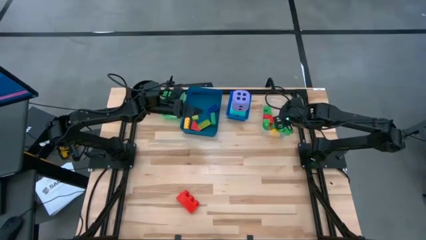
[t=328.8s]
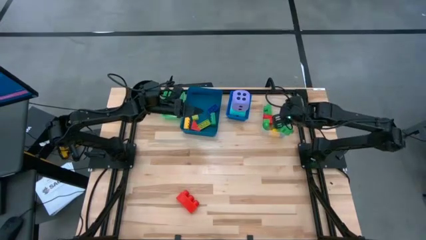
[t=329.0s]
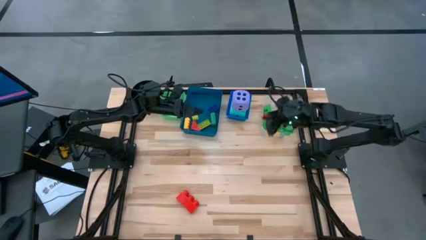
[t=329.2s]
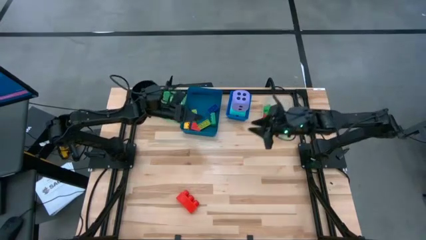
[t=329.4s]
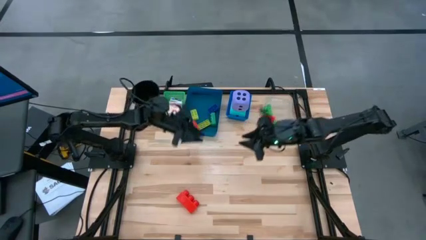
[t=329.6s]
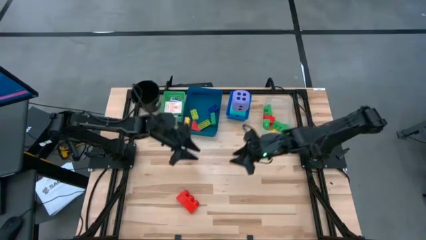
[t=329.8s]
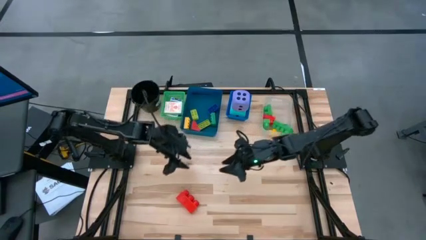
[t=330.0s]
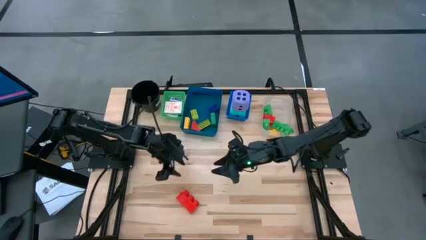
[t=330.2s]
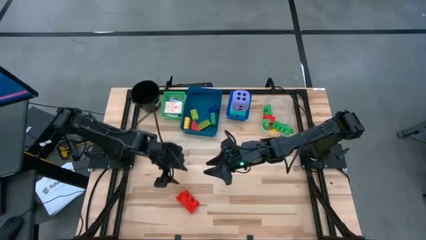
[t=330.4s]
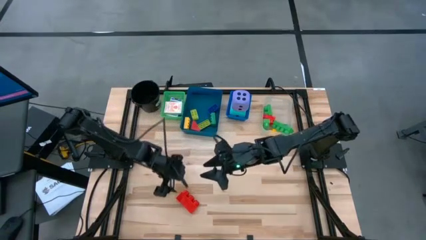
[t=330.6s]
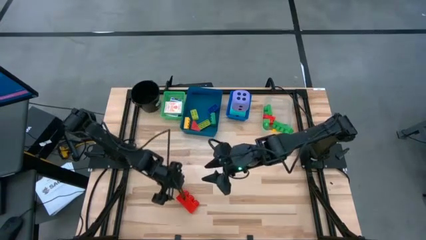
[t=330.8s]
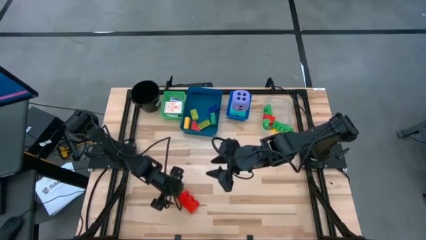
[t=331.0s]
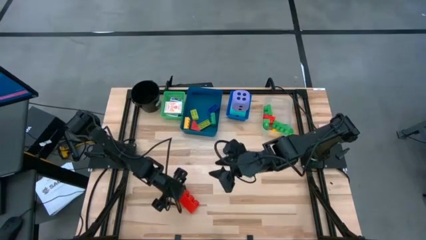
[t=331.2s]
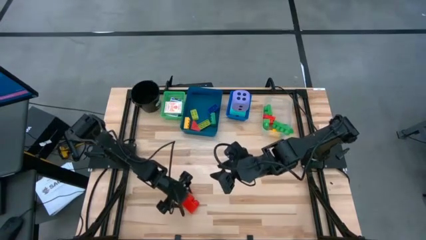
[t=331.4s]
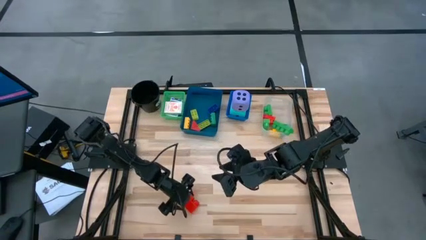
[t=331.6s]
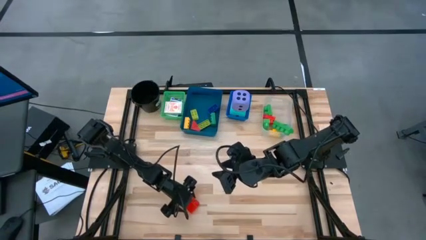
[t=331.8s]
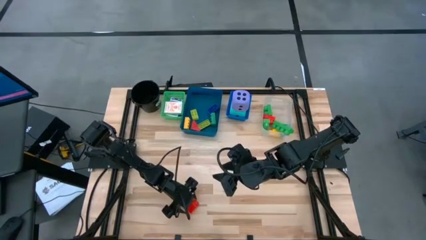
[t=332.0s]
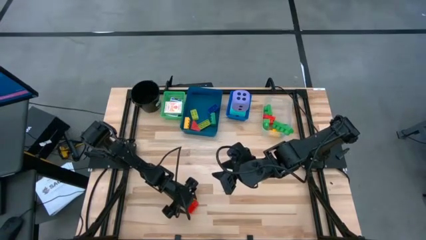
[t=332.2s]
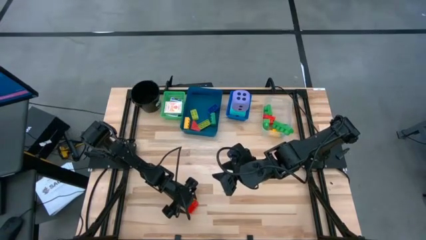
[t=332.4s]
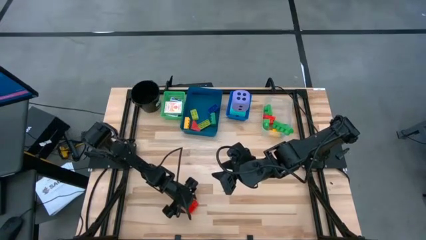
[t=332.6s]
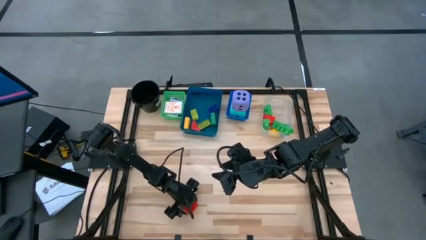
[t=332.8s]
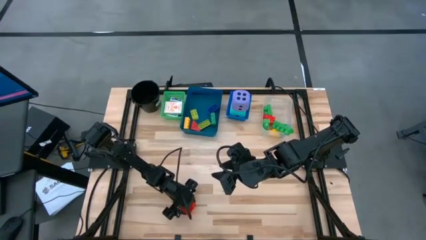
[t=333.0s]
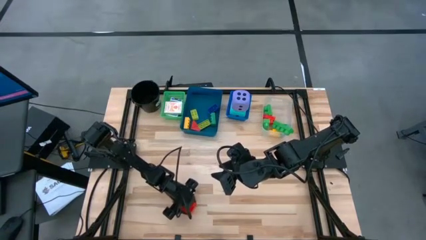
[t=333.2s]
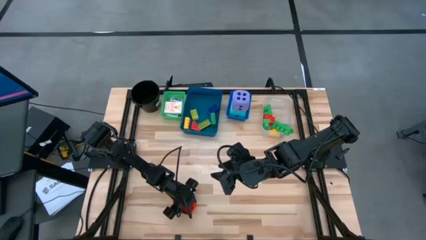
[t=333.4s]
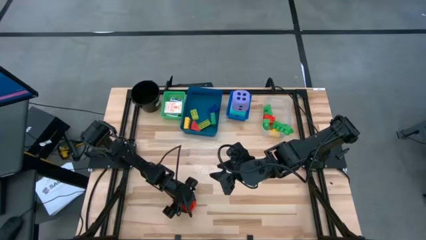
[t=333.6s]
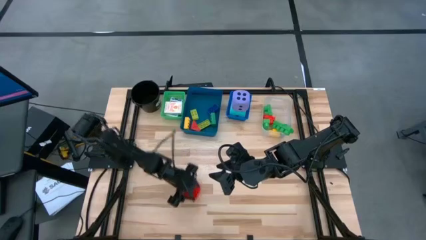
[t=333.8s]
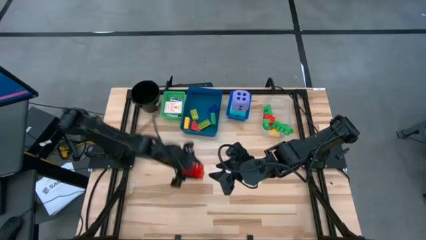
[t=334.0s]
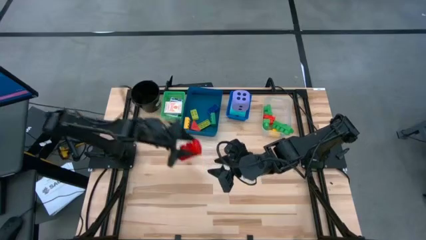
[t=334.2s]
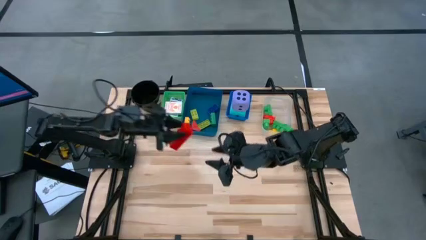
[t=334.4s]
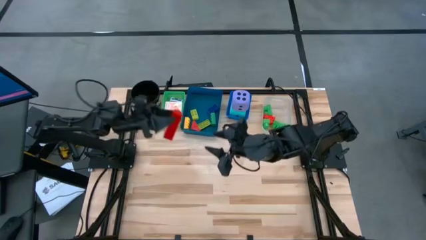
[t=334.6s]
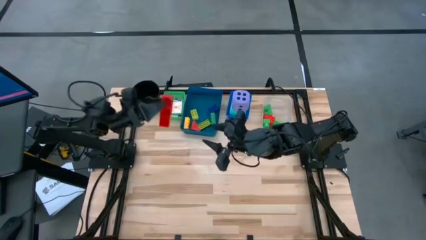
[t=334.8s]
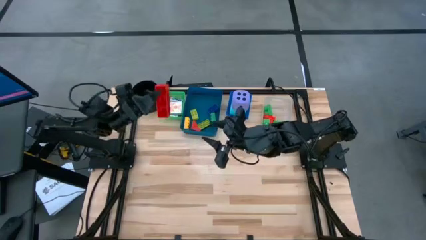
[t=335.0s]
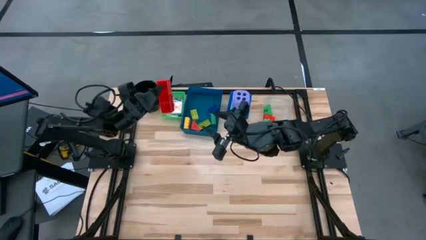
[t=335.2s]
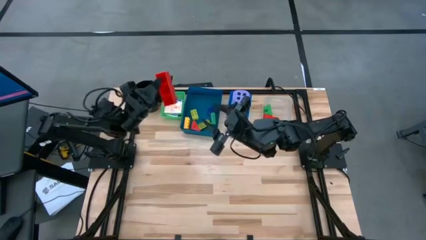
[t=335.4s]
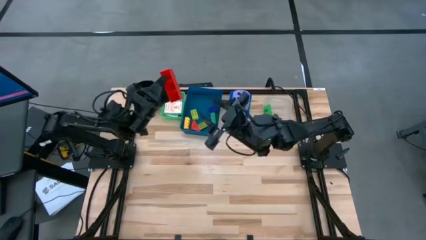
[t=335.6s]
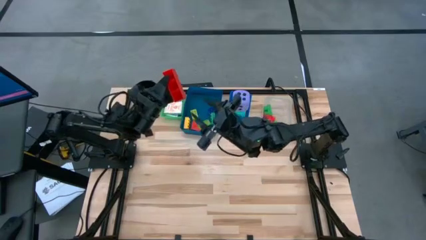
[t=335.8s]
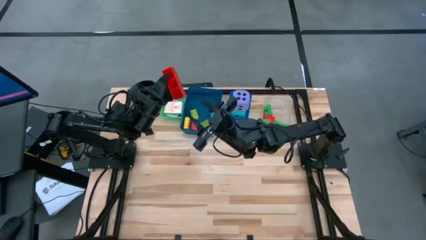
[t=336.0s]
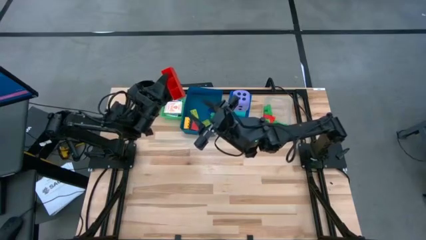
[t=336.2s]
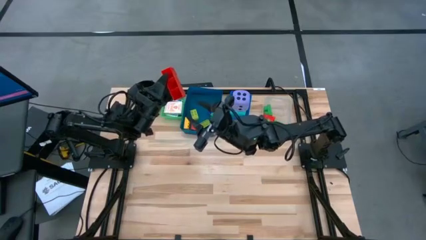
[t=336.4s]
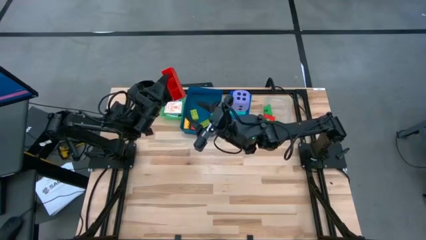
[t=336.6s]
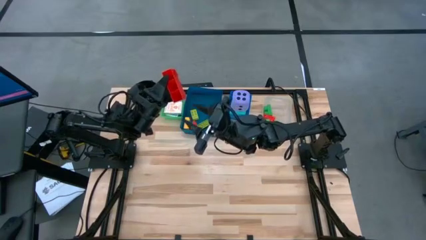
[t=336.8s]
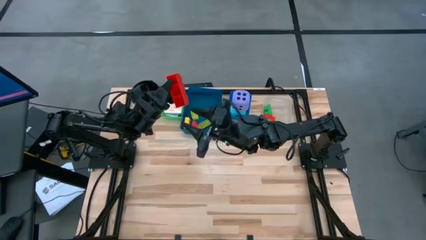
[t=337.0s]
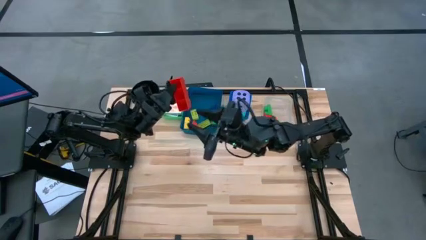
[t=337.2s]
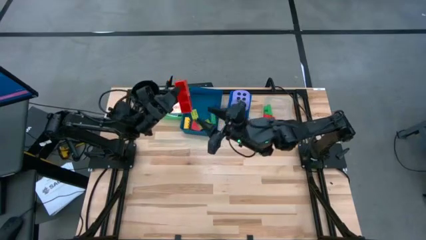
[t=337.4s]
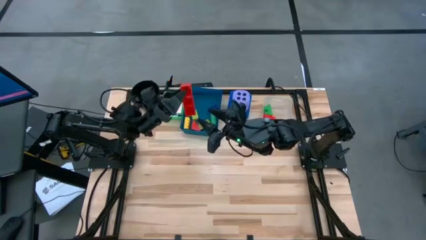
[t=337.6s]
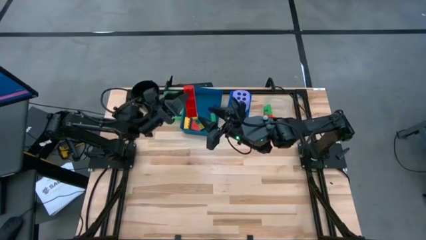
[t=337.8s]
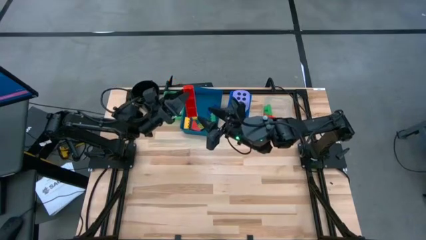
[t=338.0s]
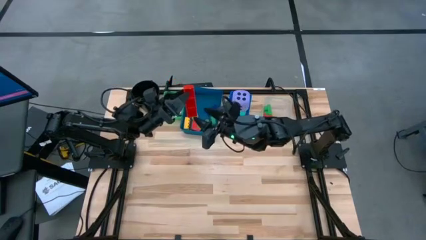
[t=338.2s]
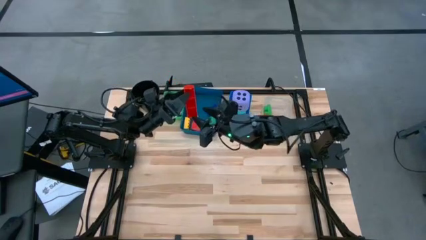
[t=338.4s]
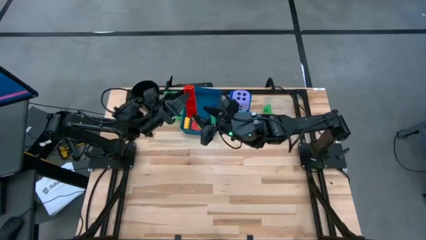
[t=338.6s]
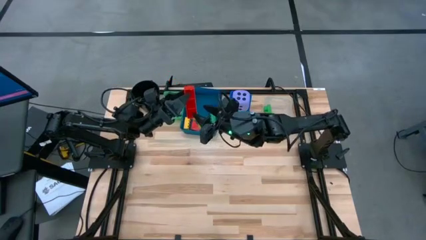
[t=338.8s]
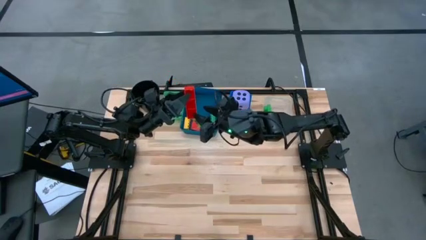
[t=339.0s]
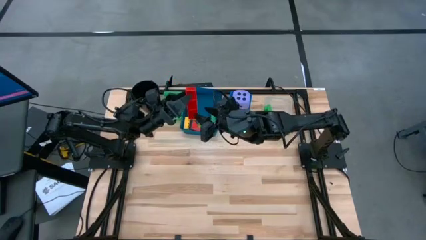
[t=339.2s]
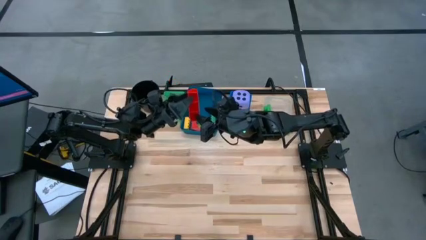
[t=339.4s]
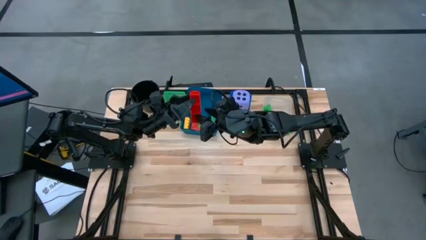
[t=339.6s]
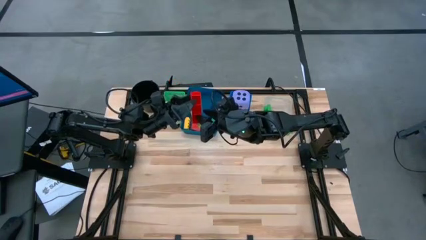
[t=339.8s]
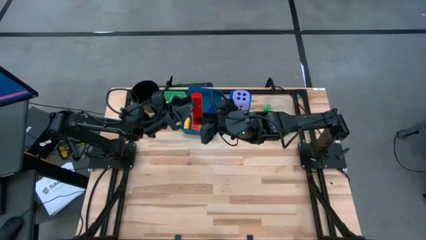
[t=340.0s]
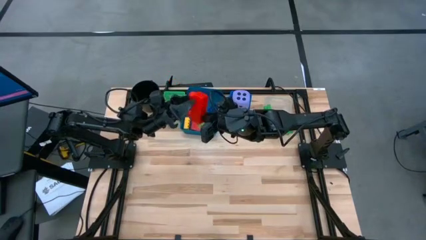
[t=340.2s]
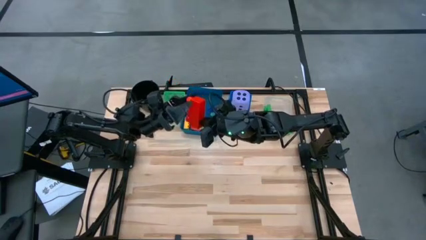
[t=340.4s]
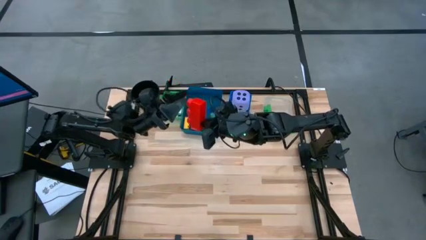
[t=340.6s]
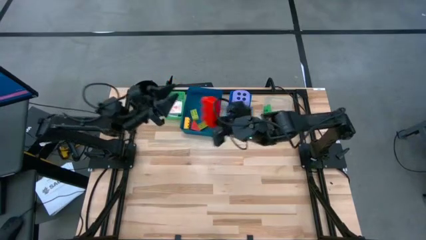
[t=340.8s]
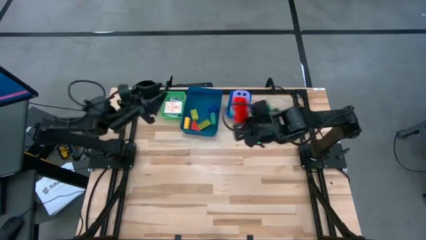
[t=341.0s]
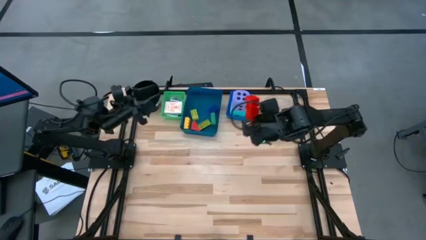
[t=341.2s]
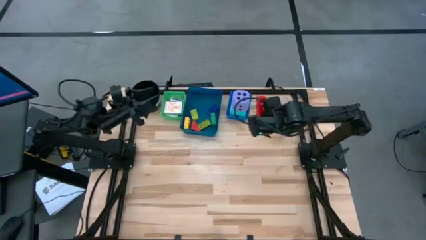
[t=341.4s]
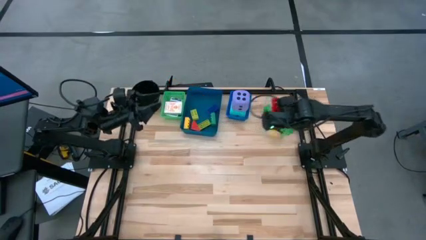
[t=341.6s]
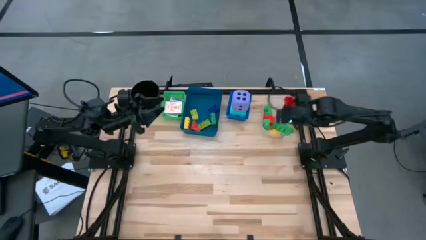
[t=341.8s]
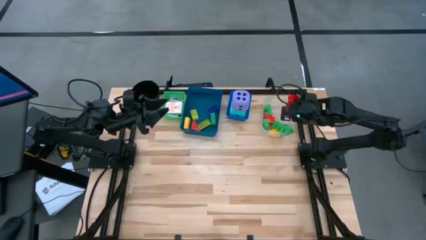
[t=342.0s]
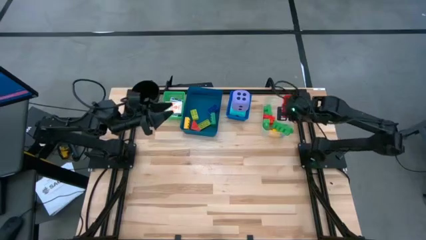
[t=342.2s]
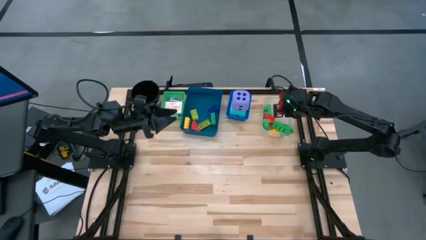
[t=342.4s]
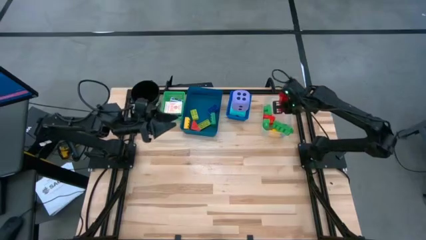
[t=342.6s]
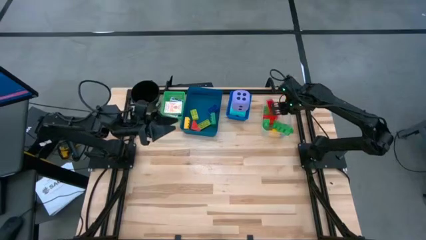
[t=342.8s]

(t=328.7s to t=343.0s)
Task: Pick & Place Toys
Put the large red game piece into the transparent bin

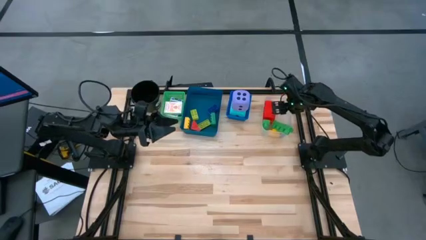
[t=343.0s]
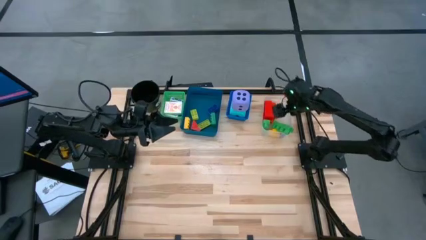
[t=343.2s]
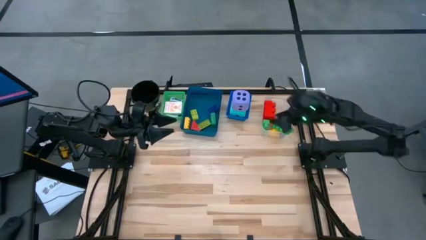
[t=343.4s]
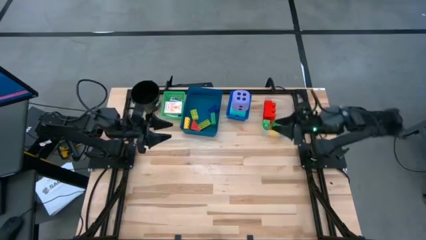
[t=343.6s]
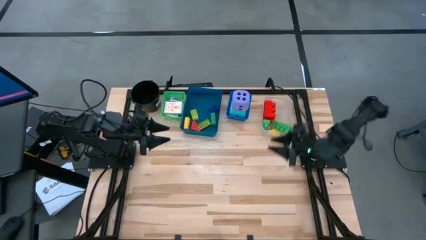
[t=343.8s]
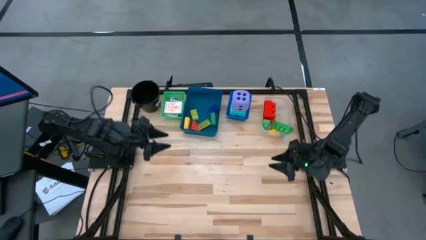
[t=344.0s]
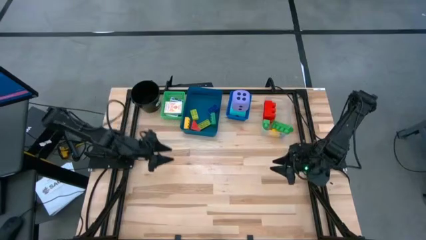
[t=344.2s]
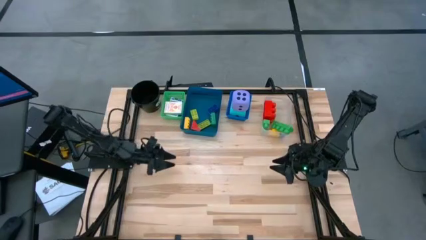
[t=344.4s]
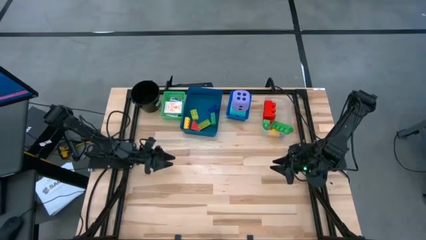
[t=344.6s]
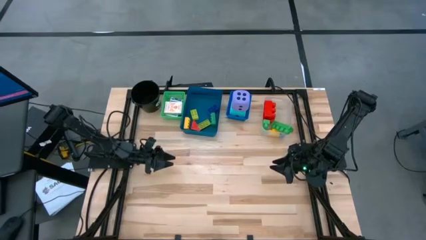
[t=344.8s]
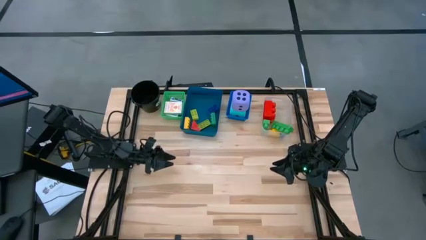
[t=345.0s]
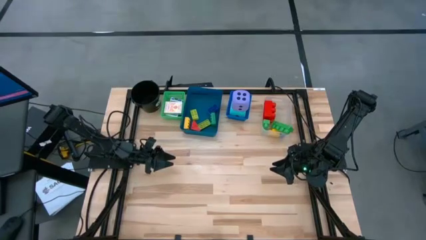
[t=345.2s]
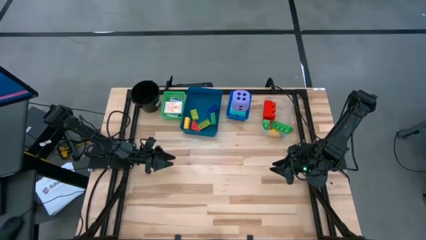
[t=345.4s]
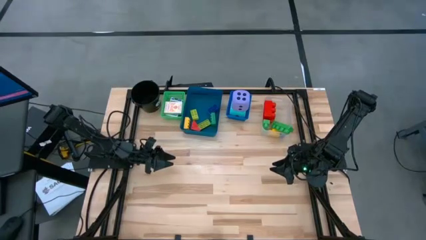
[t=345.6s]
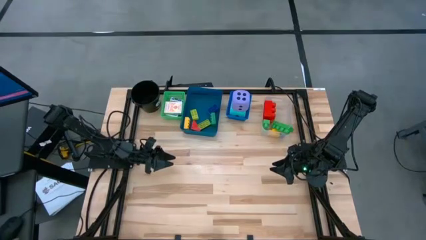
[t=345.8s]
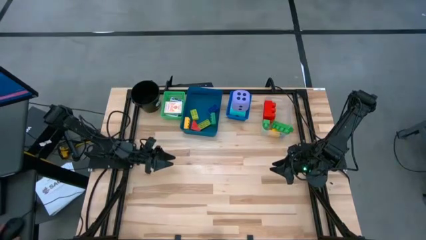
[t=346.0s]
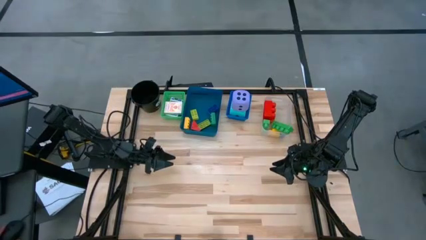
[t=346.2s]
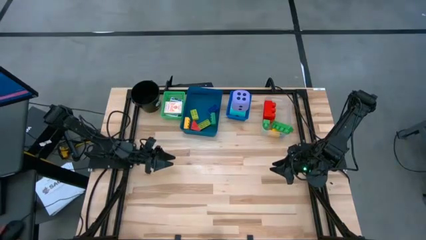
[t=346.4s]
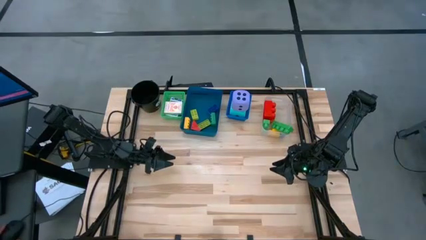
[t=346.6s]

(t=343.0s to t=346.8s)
Return to Home Position
